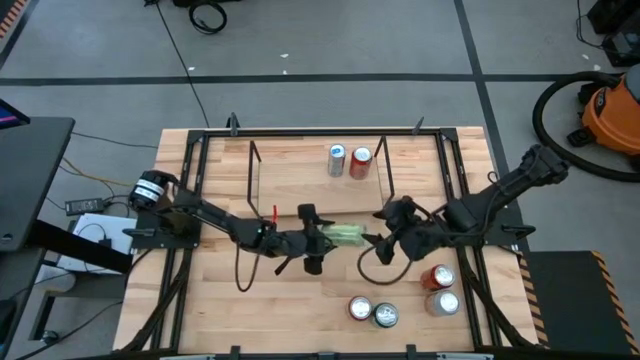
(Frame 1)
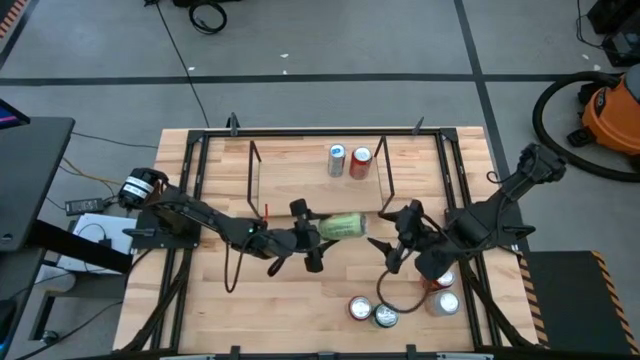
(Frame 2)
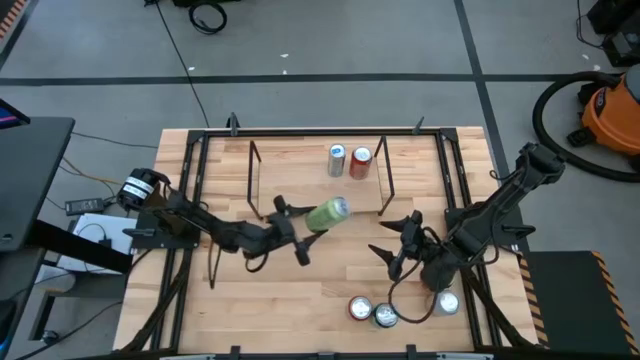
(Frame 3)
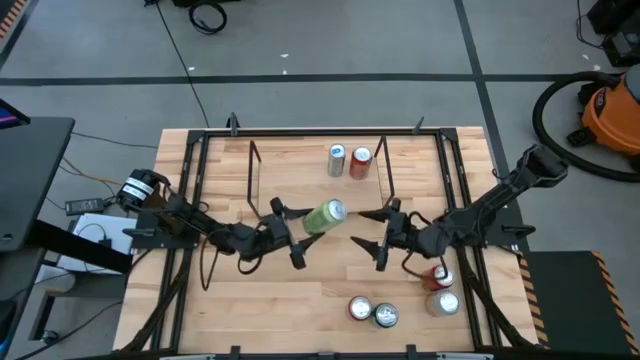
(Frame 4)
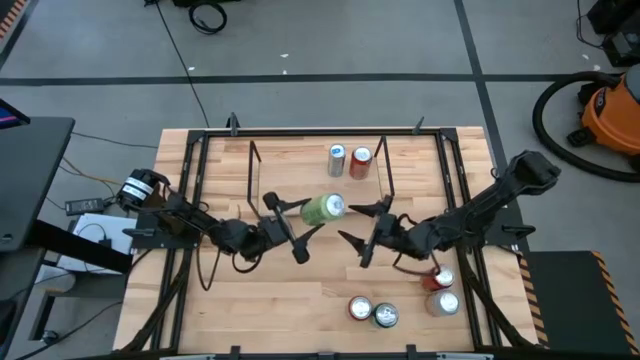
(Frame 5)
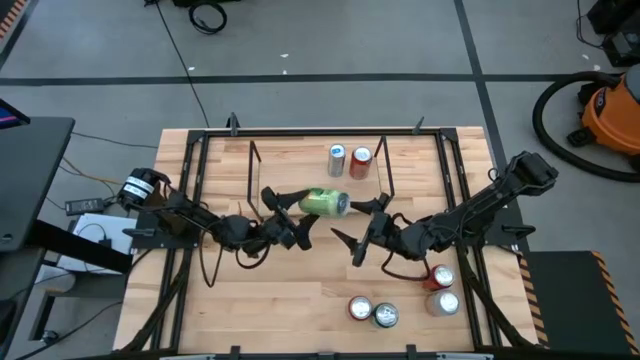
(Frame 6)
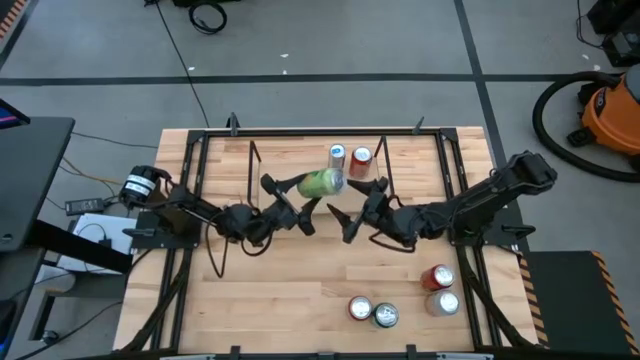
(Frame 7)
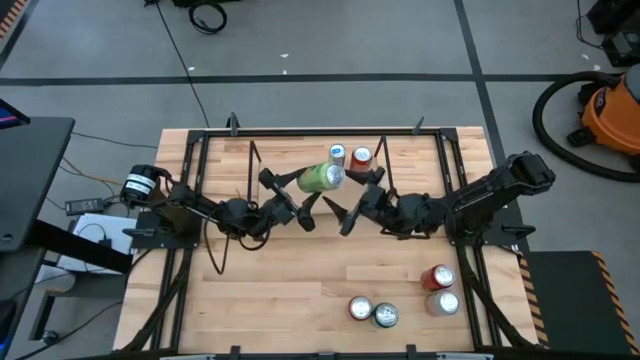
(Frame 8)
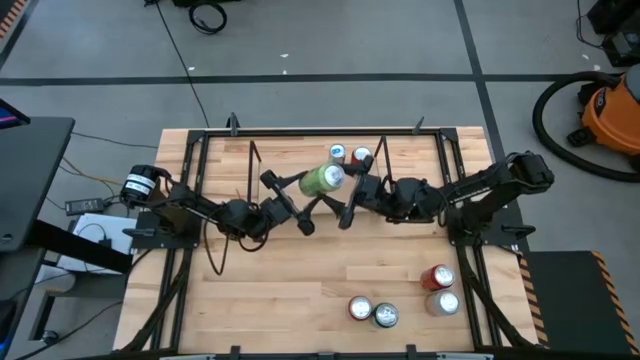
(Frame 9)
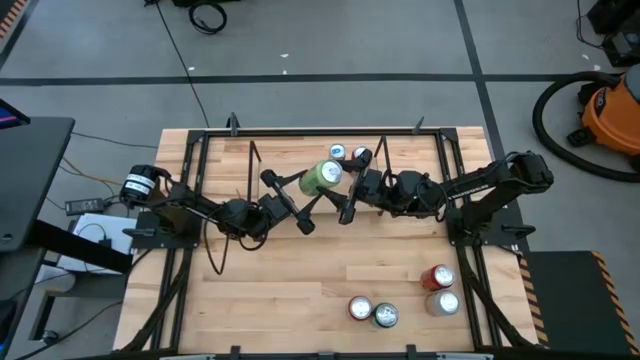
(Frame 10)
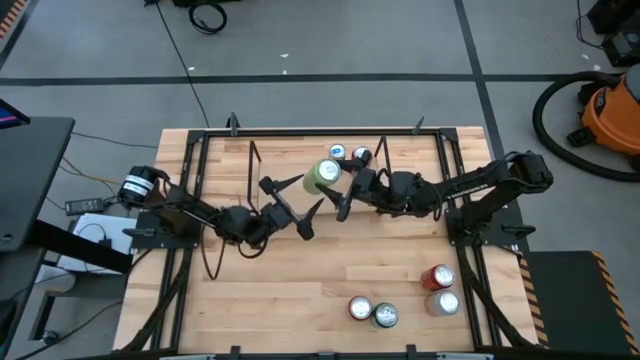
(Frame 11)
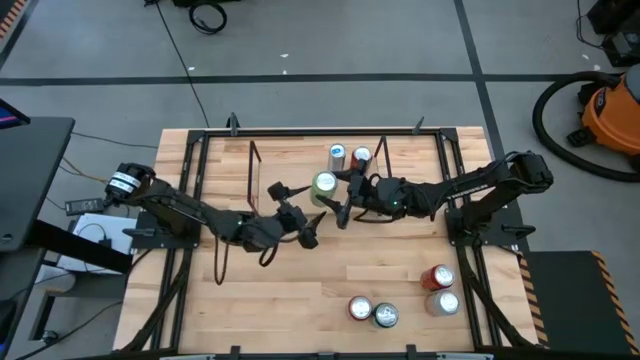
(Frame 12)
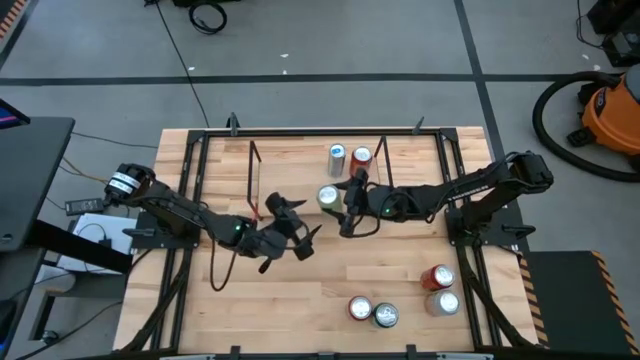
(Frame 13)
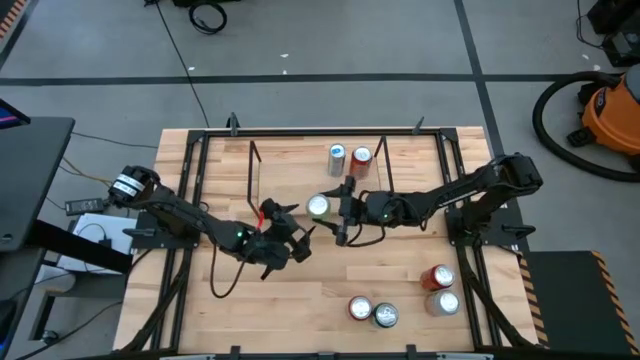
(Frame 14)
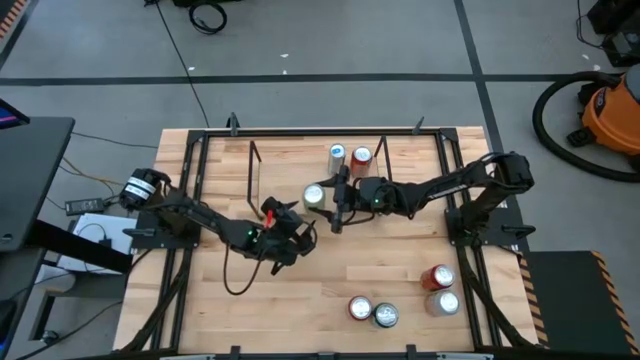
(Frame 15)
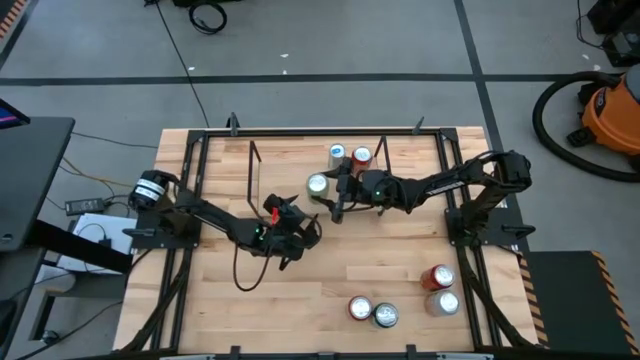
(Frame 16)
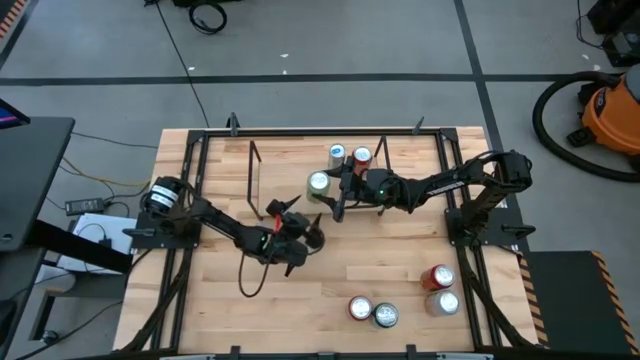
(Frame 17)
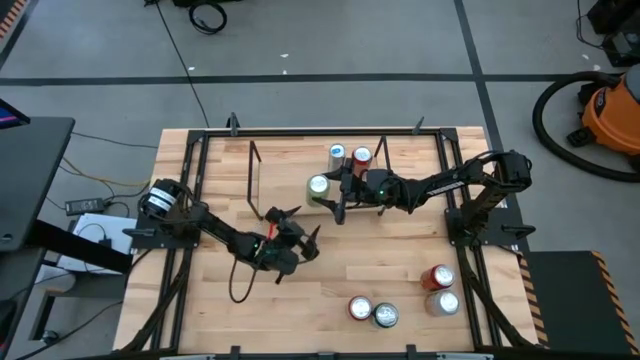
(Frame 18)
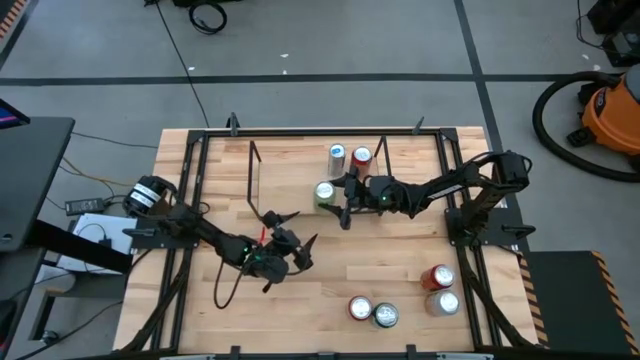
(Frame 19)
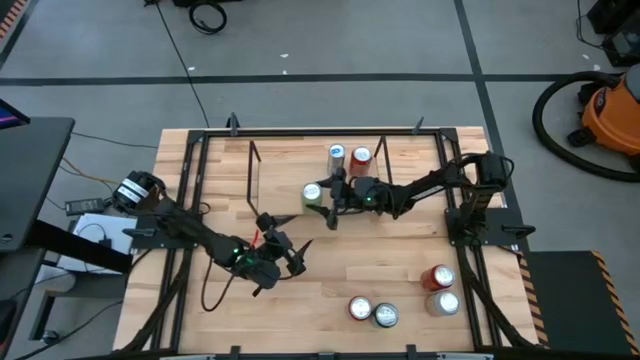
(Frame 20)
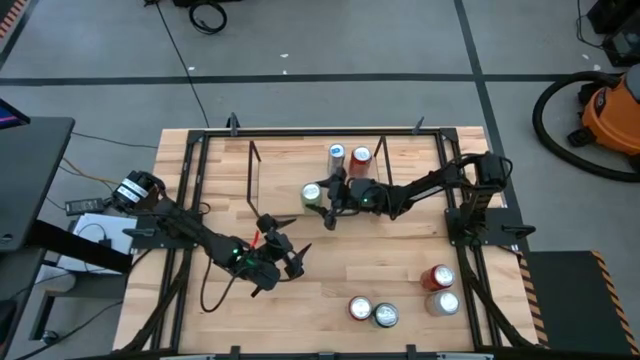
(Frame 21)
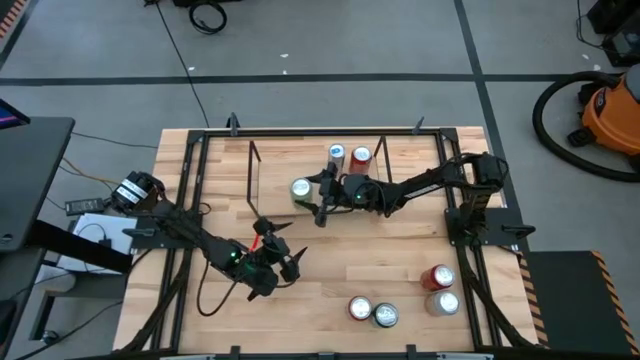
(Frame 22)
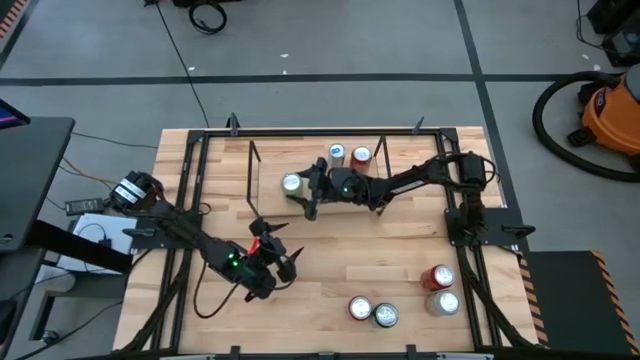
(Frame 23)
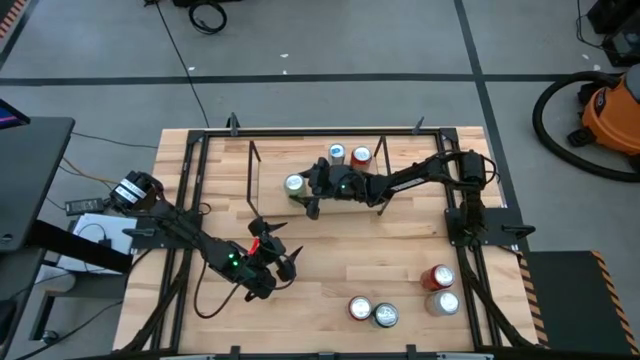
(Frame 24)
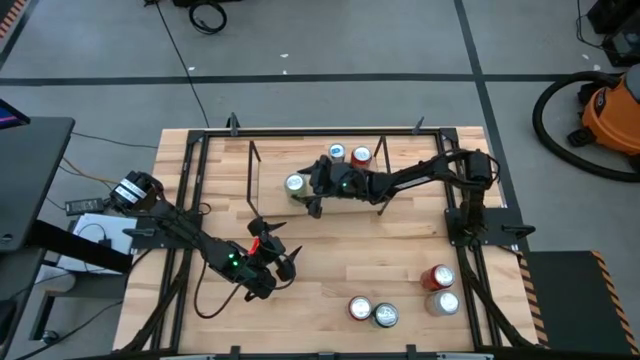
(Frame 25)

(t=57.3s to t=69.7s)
Task: Place canned beverage on shelf
Put the light green soda can on the shelf
